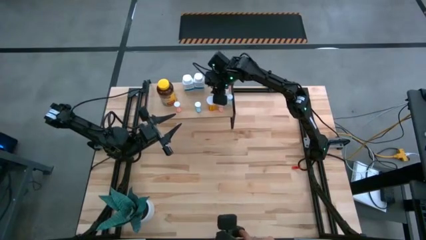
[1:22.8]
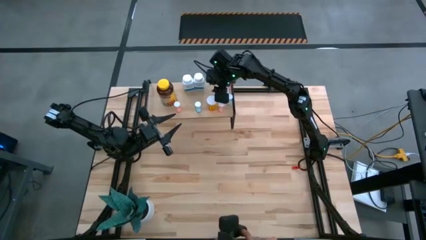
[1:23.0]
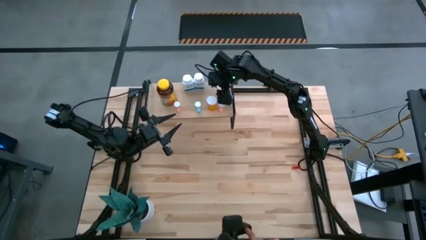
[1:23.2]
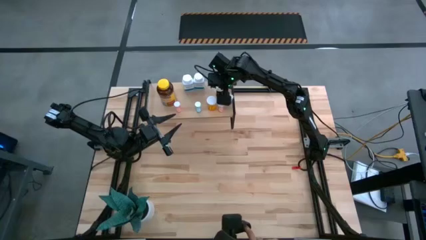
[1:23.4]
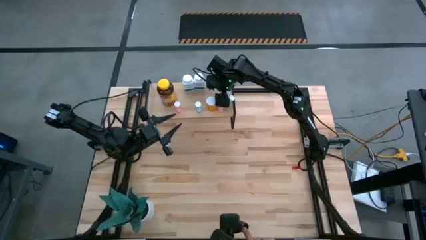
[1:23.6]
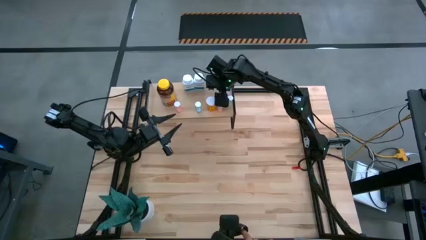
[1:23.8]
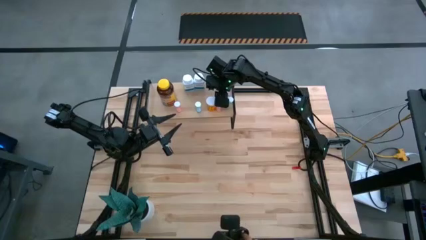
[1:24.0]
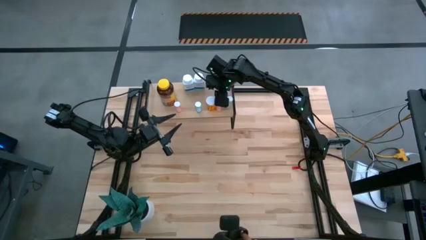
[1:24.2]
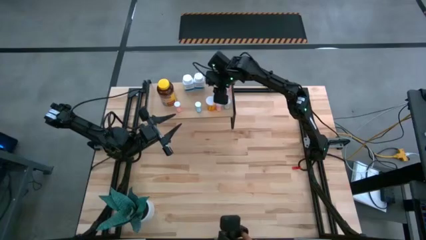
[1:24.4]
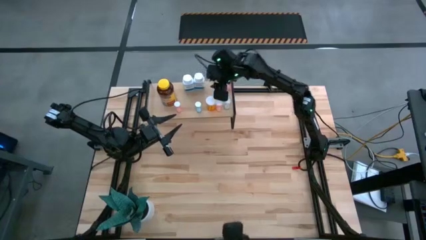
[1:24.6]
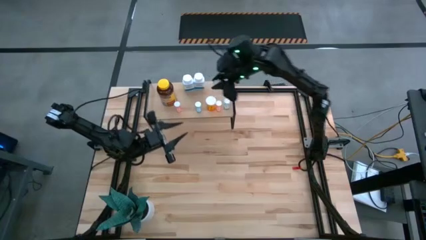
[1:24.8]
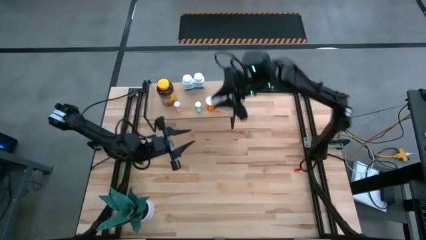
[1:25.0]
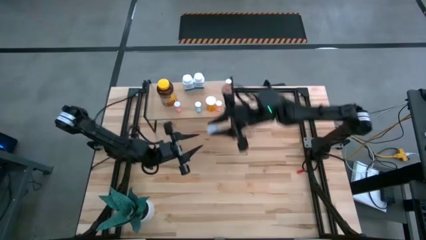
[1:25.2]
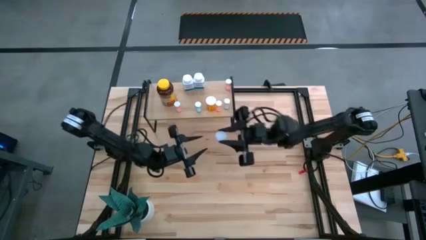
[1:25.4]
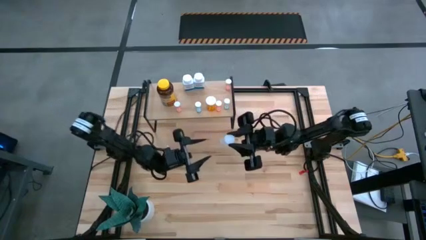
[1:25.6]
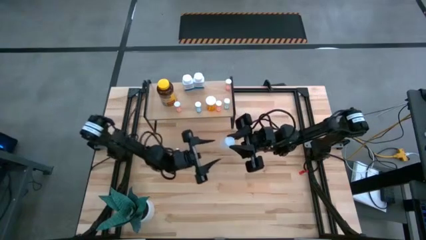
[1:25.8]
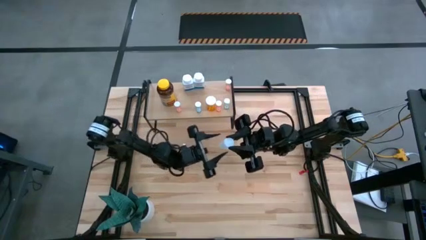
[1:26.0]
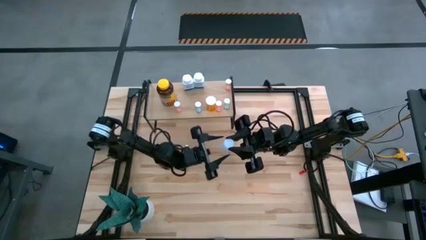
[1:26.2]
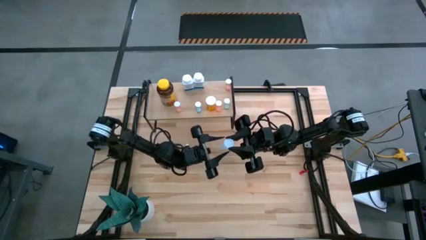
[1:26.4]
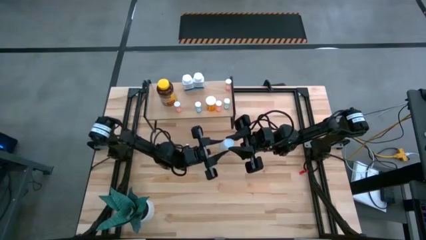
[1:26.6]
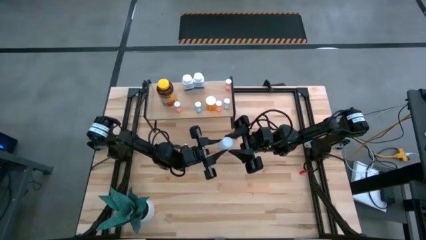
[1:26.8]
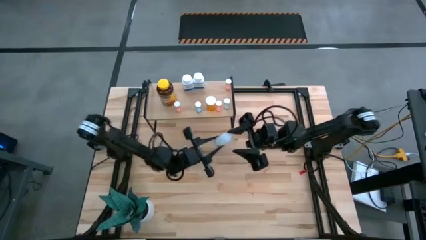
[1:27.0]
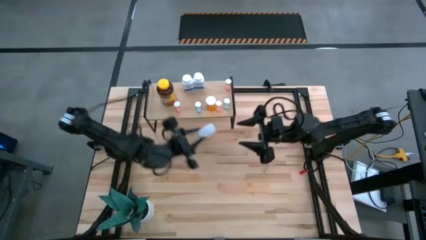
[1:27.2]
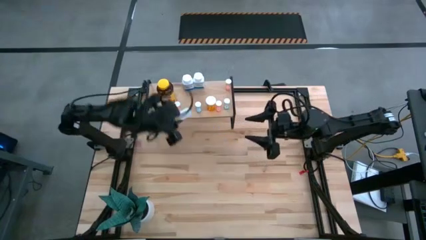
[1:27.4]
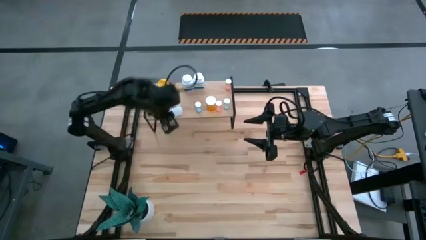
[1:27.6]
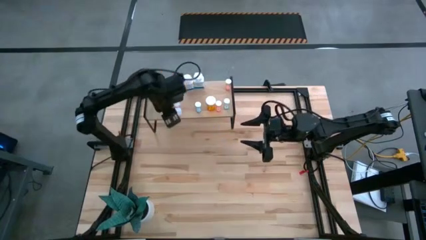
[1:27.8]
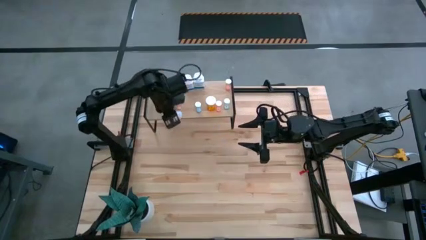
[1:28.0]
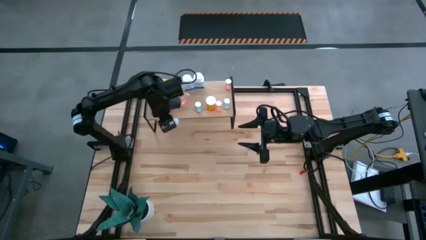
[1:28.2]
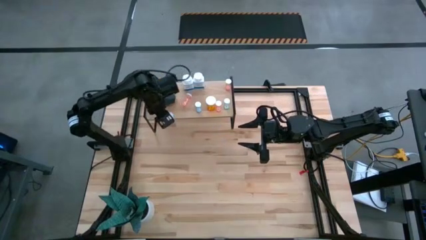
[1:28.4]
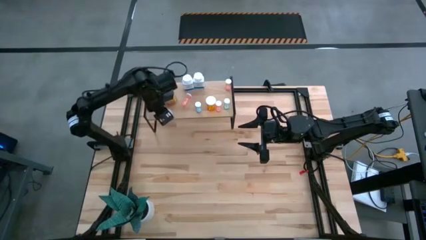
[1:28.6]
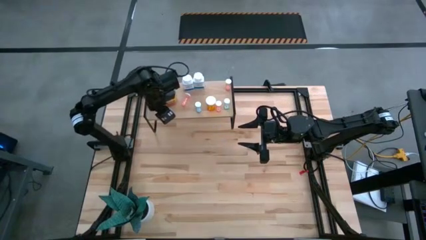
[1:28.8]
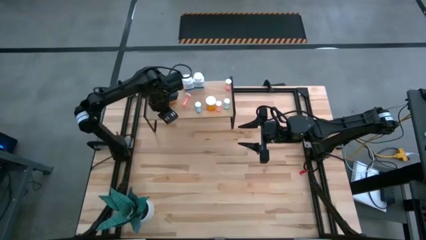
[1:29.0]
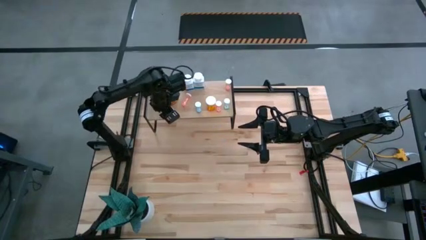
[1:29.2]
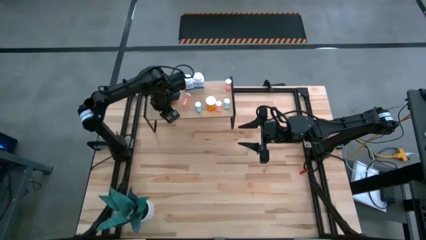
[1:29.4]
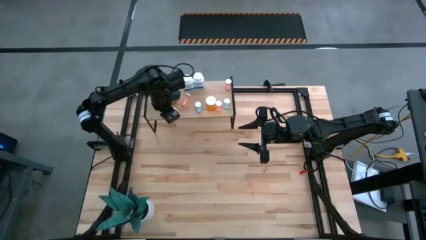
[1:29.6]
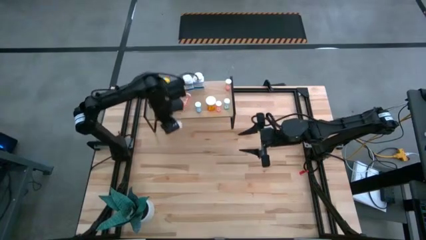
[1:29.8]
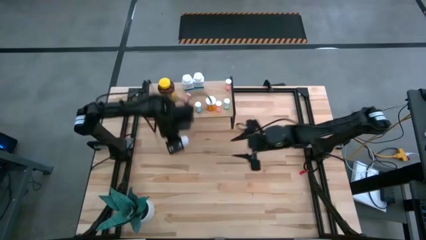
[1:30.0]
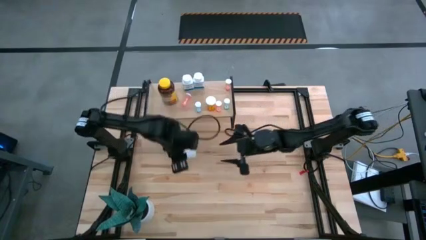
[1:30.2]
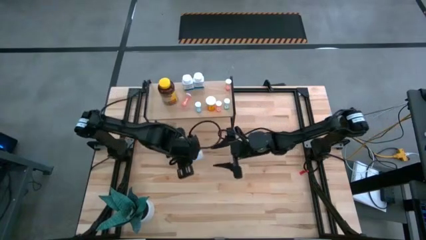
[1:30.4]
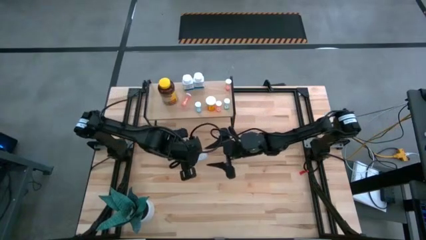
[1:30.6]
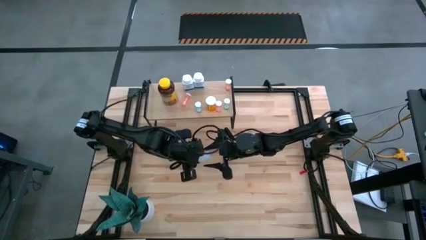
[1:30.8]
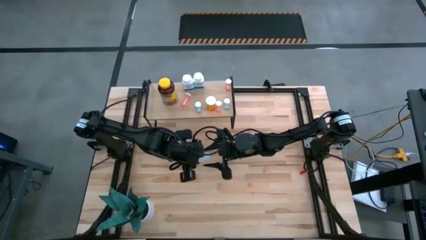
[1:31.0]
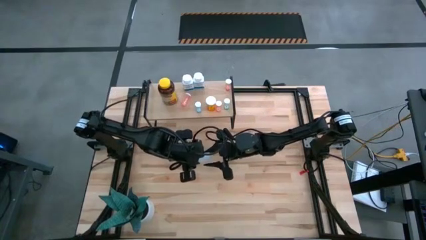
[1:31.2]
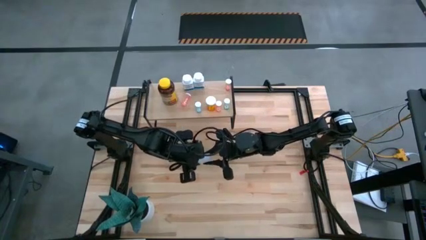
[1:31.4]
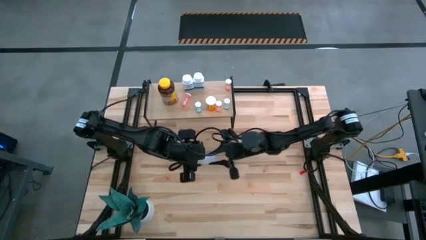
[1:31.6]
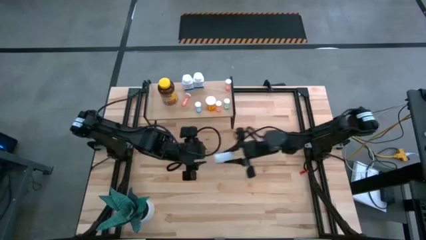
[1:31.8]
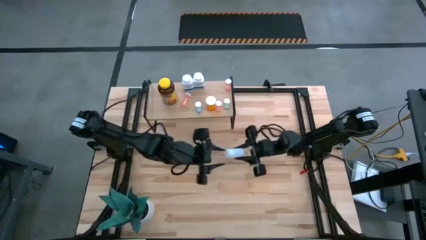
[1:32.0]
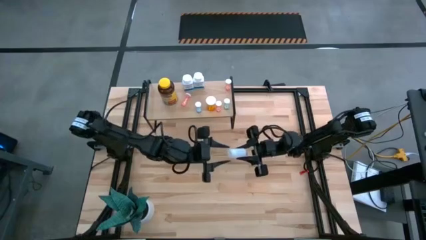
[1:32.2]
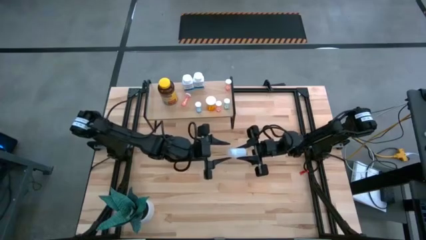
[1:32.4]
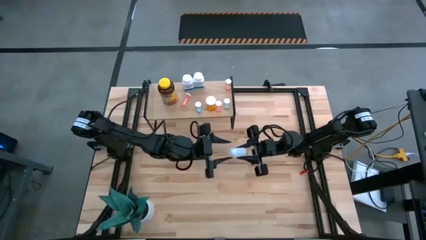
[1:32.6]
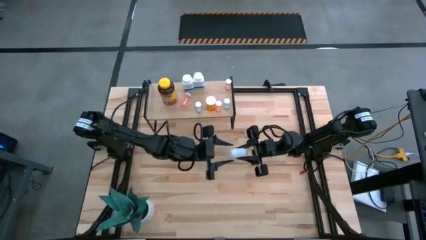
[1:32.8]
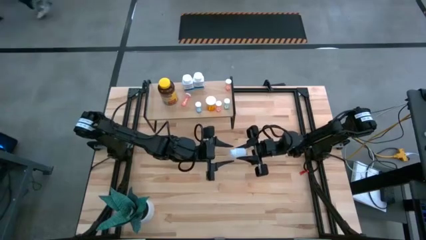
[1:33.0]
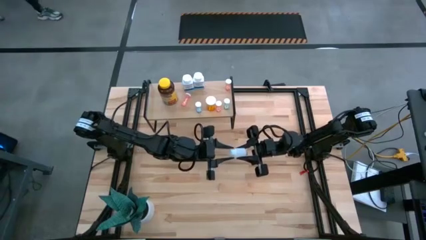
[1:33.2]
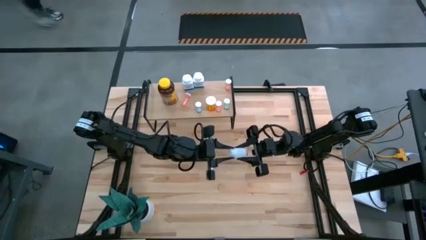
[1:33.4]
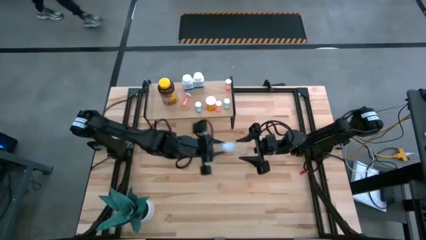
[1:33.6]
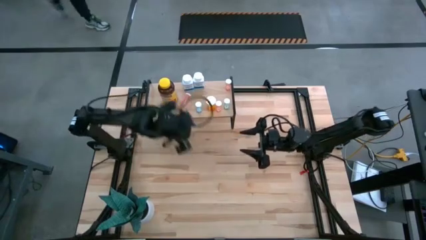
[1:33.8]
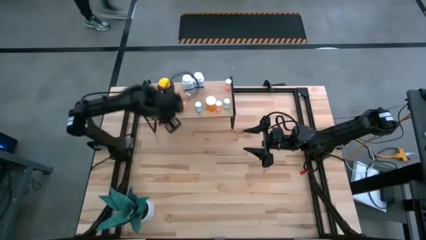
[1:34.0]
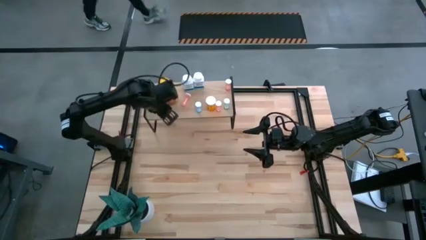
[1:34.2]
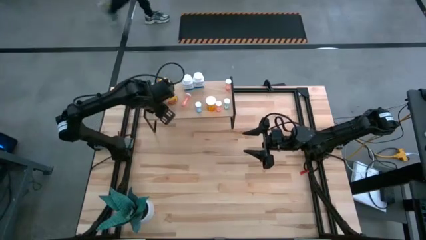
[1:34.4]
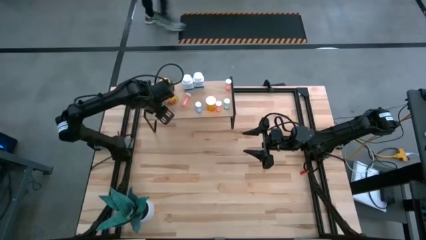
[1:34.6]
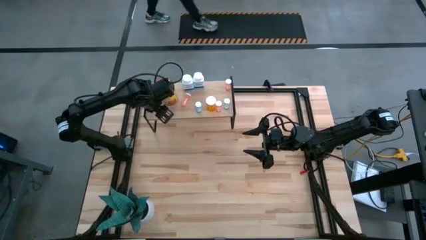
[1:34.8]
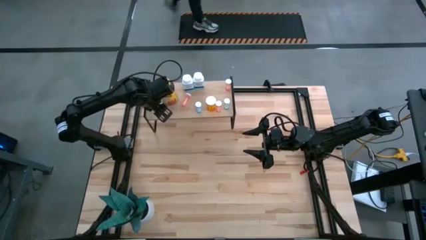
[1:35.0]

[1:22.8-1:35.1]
Task: Pick and place medicine bottles onto shelf by color
Put the transparent pill bottle on the shelf

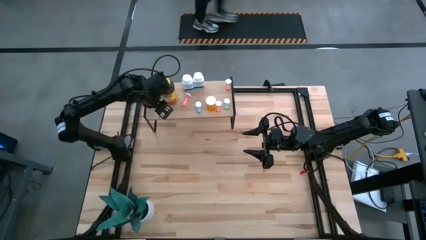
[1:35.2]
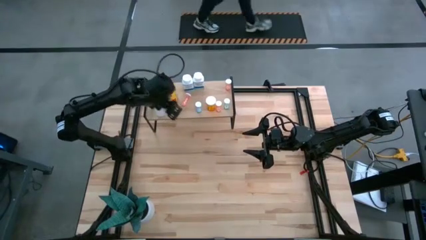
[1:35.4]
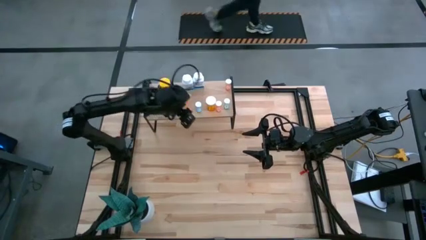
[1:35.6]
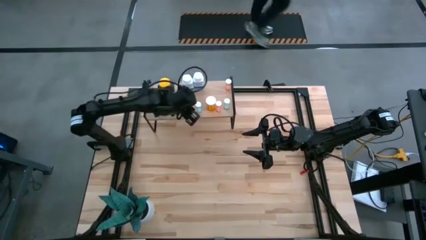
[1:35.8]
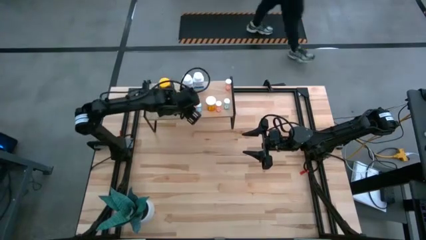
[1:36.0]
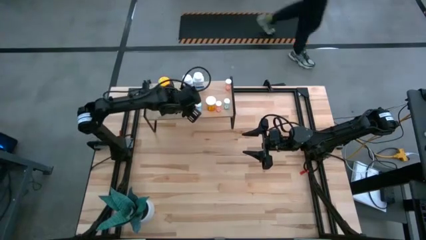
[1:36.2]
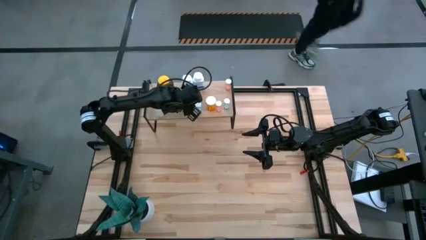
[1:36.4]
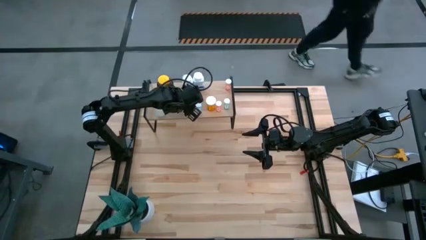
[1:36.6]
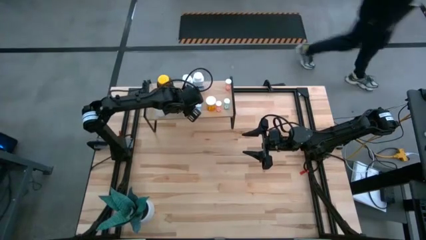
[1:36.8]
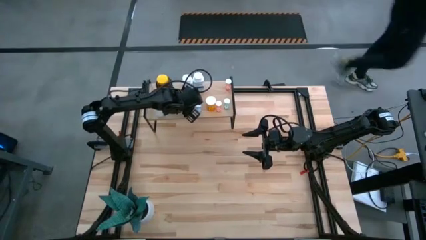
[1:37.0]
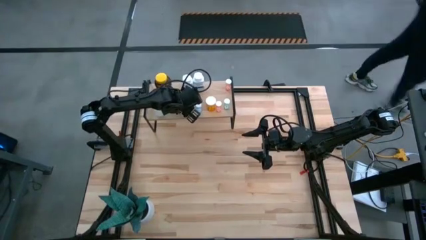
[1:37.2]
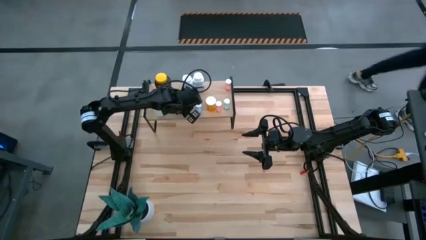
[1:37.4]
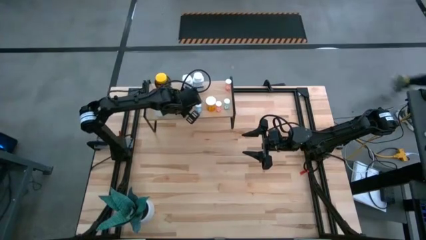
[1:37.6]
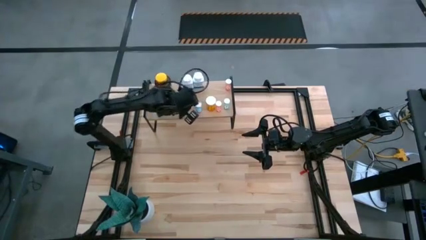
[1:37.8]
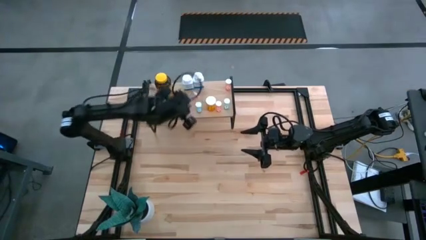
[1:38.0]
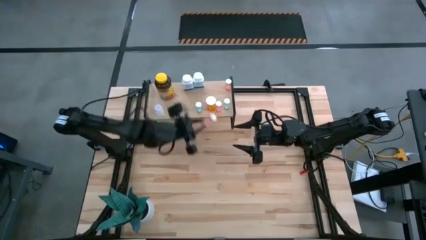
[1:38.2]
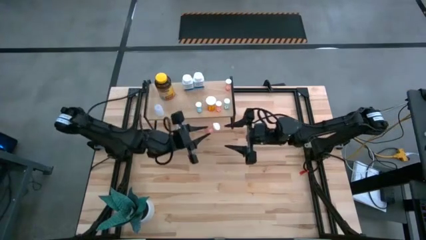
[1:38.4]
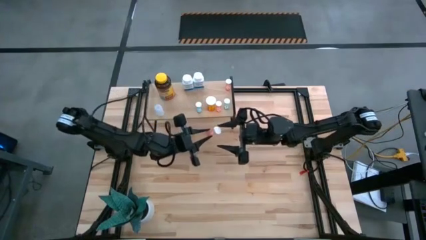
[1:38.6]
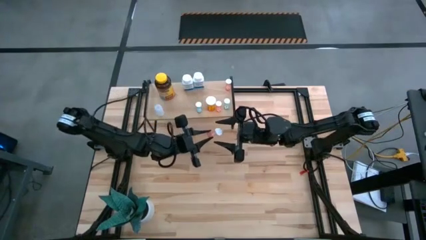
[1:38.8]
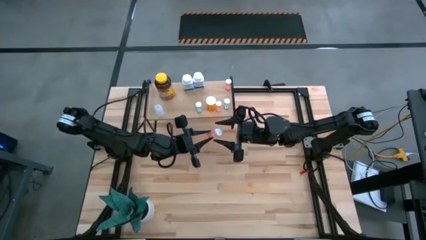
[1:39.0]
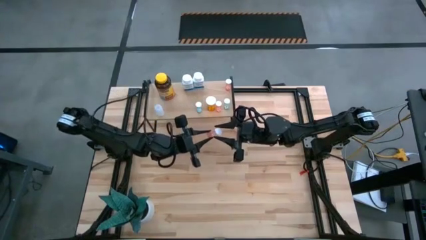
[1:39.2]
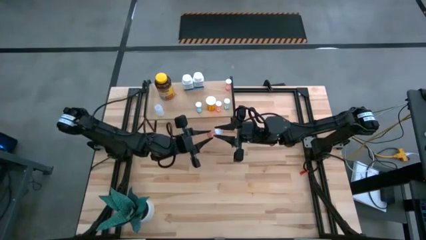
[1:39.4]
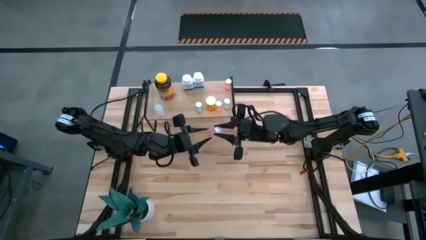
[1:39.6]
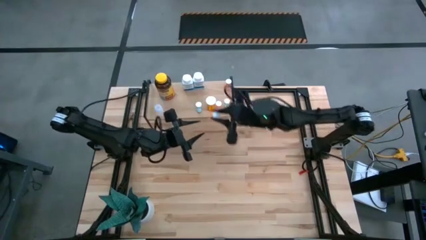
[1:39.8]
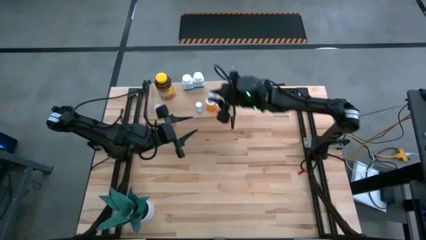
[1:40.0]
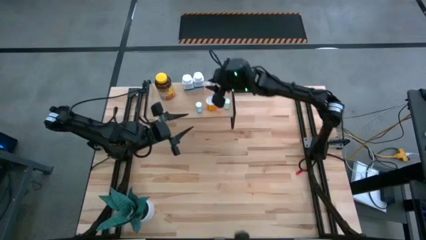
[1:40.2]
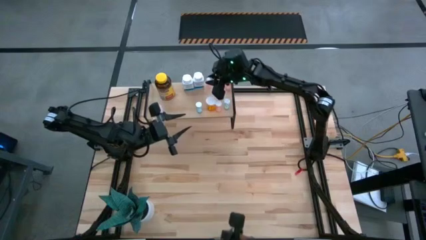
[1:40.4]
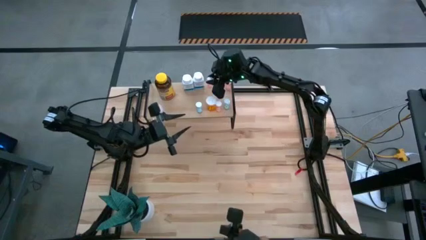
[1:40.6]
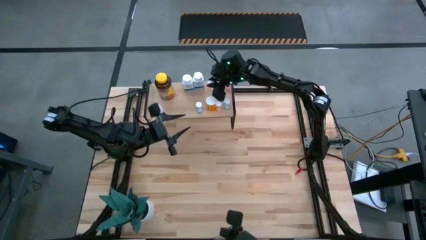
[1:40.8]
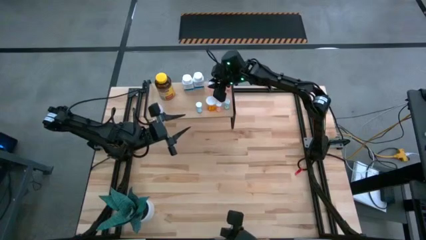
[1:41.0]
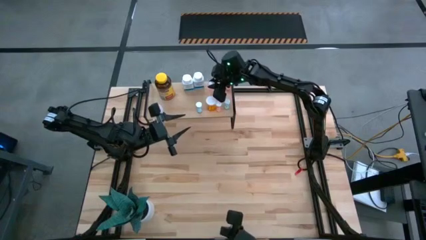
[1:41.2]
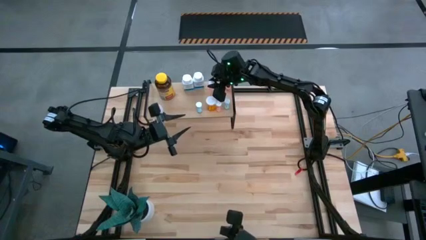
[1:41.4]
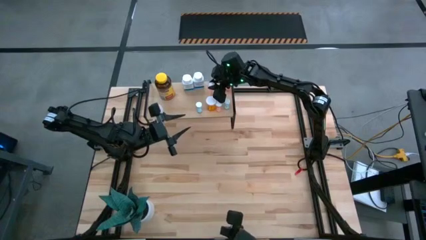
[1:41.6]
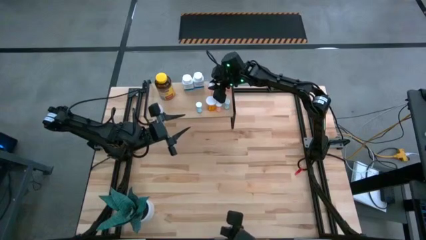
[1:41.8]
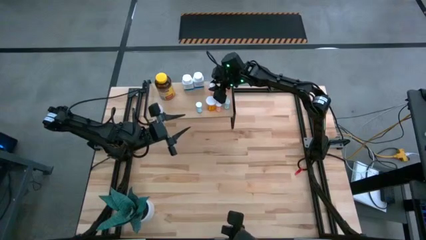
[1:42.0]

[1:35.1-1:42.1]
Adjust the pink pill bottle on the shelf
